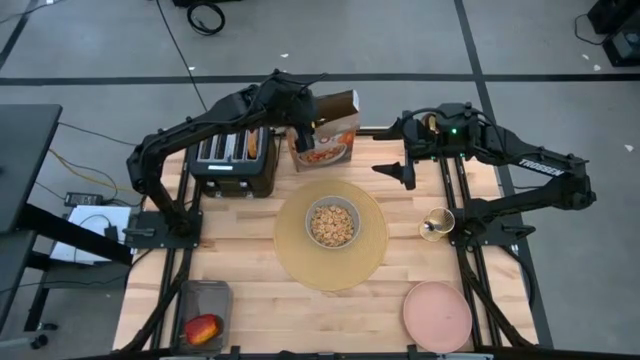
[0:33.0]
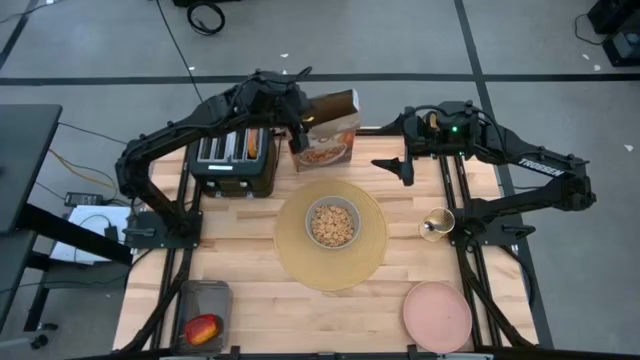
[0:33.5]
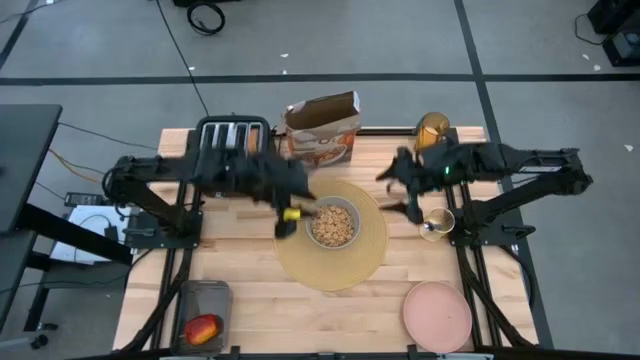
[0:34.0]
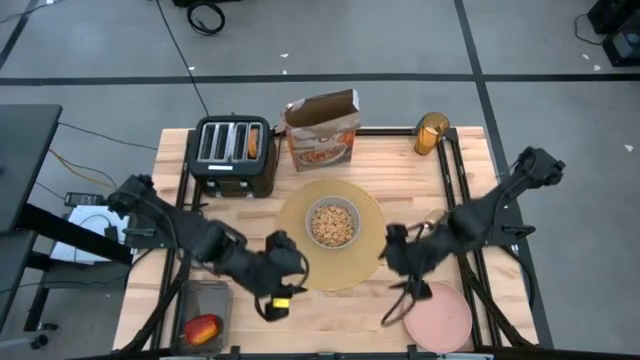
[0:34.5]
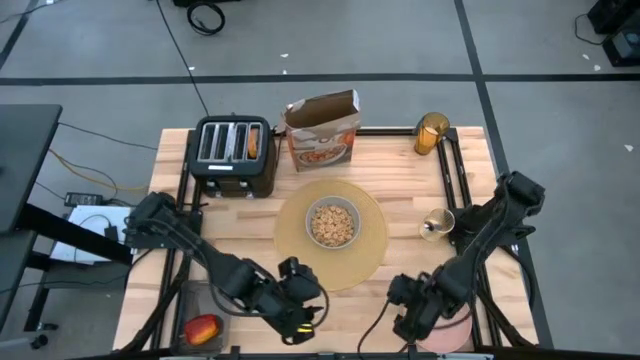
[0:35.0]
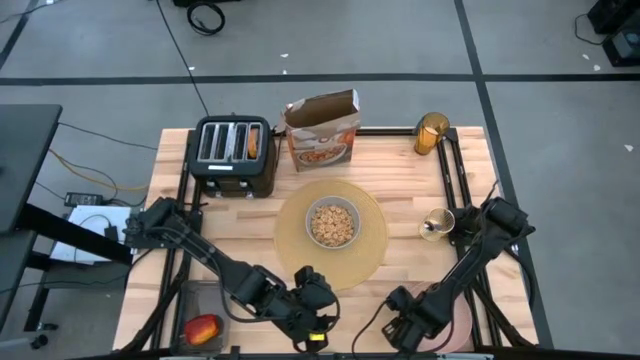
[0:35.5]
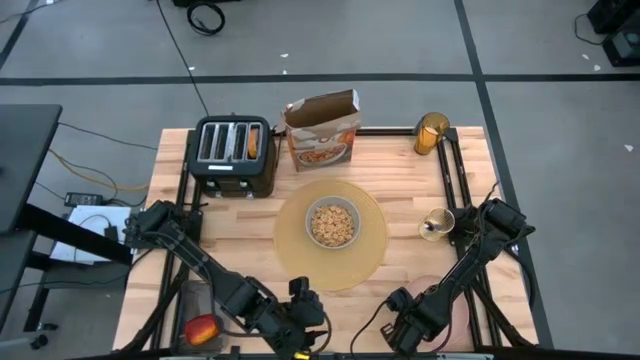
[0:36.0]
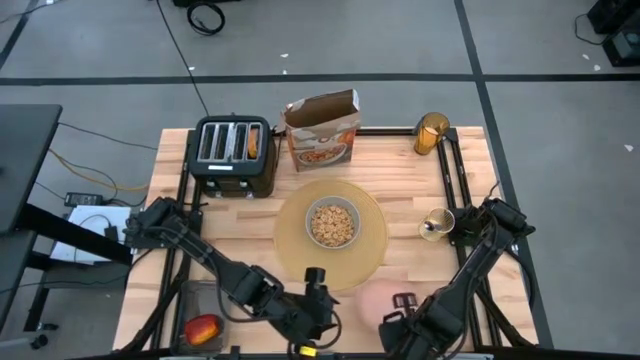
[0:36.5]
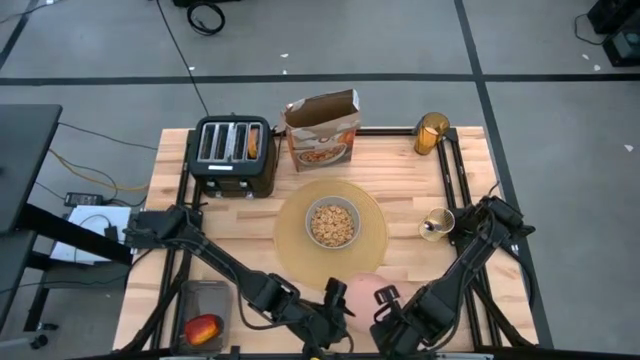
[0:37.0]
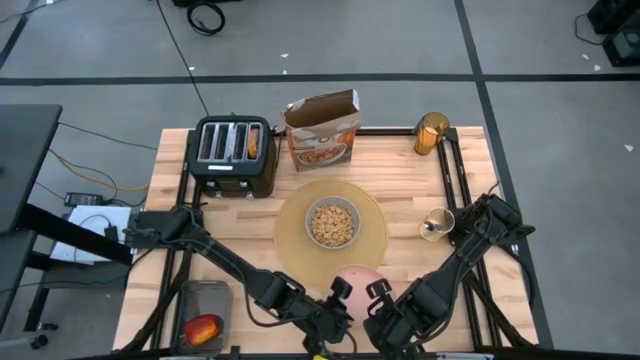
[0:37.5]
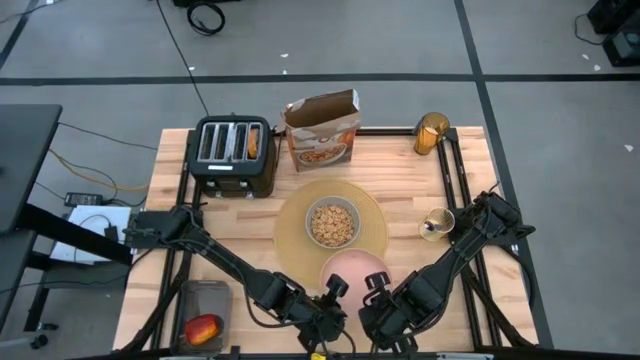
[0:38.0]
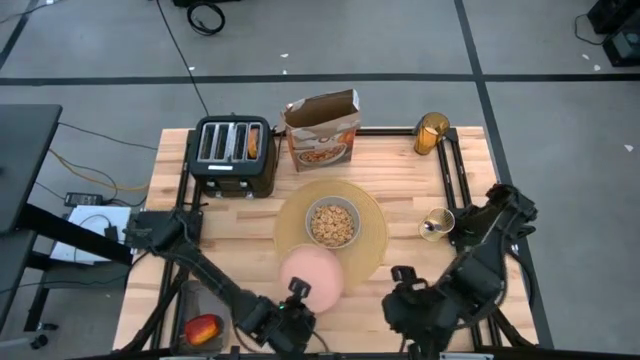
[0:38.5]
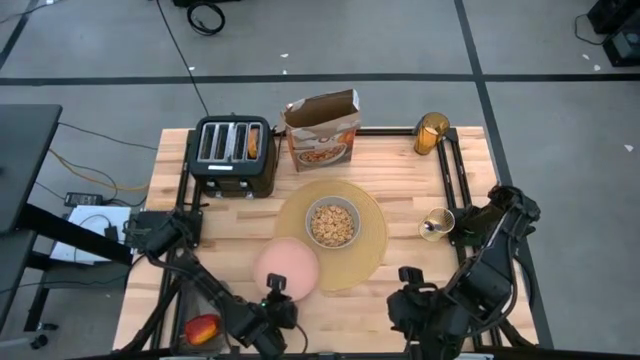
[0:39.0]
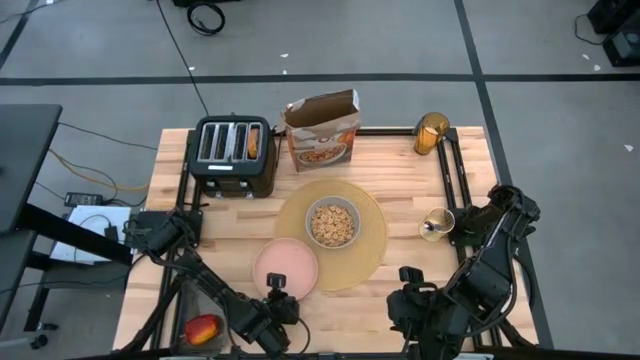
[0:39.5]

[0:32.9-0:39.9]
Task: Arrange a breakfast setting
Put the pink plate on the brown table mat to the bottom left of the gray bowl

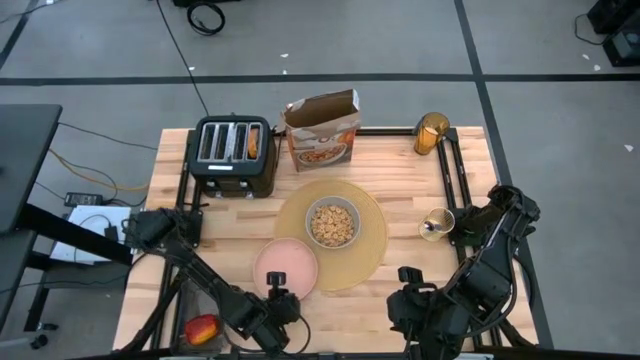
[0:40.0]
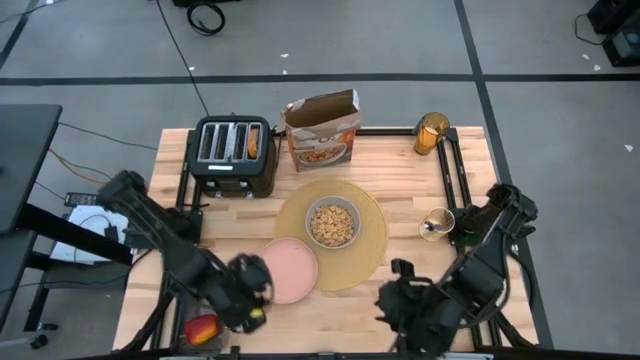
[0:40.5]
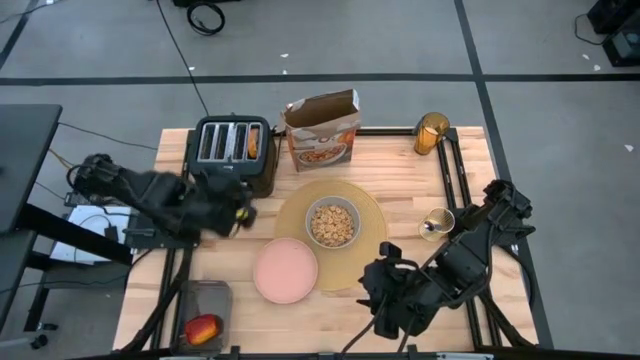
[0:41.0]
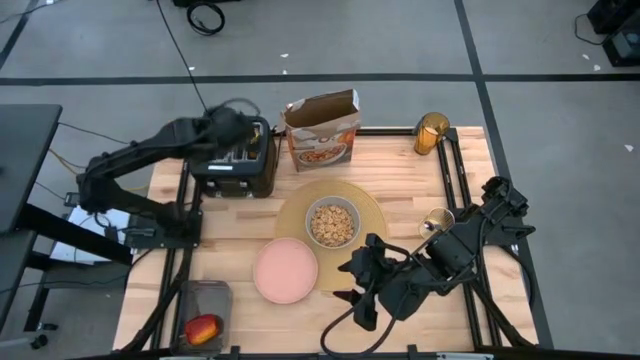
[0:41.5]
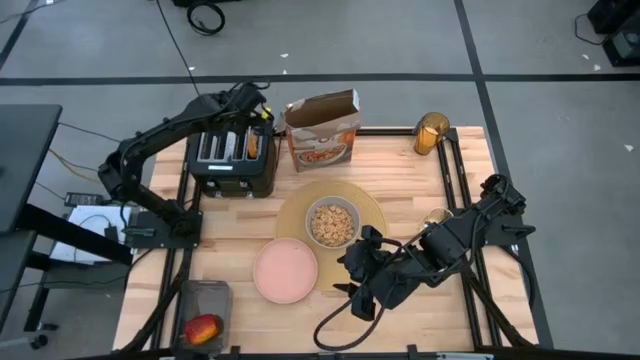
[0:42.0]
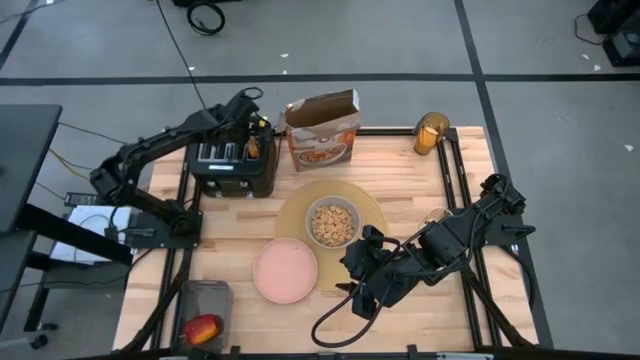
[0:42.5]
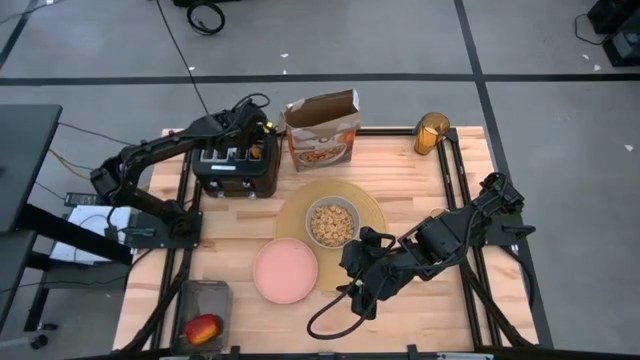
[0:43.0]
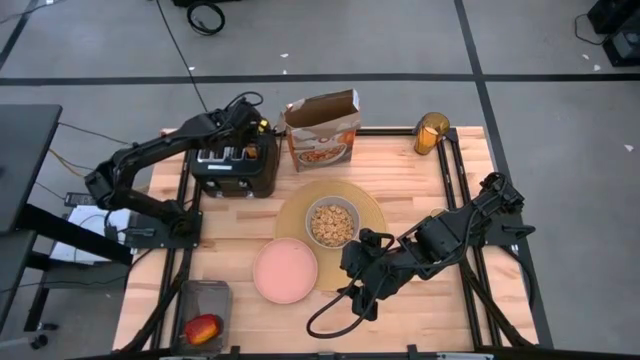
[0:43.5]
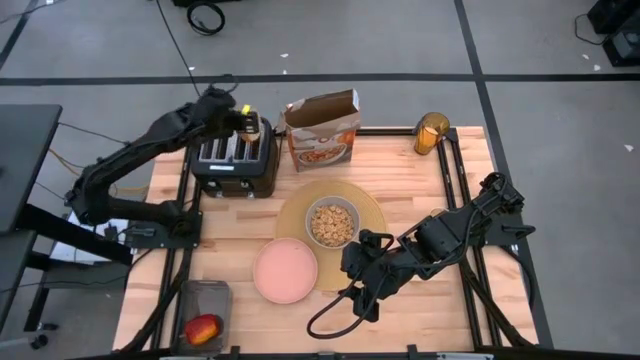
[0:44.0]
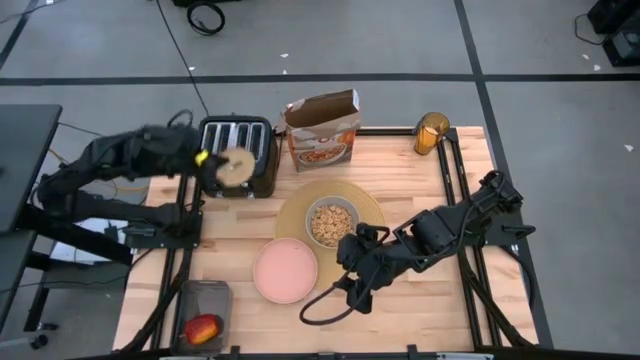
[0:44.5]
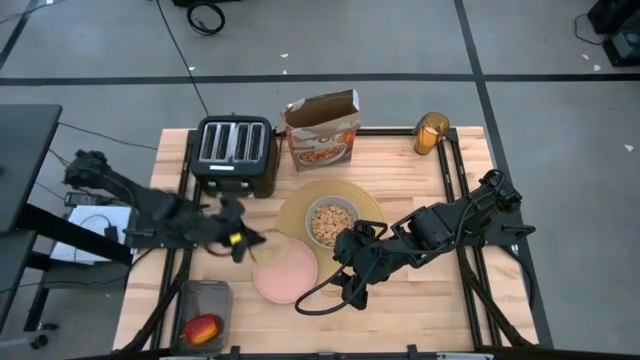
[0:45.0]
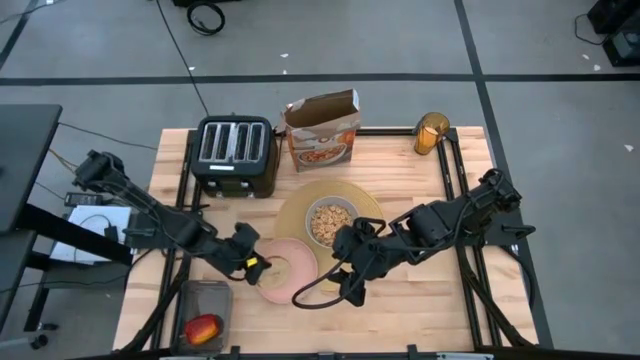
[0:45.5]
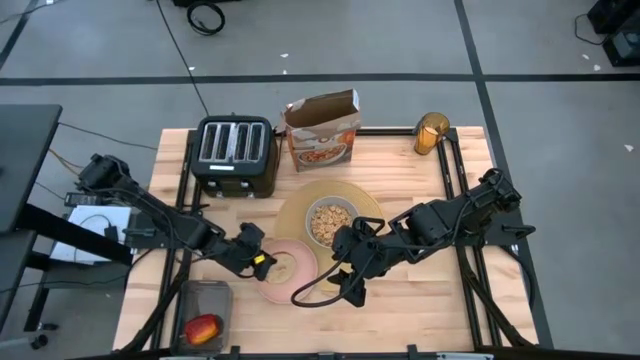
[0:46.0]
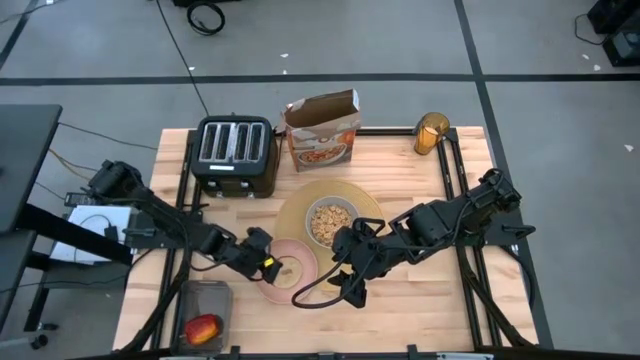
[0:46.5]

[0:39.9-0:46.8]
Put the toasted bread from the toaster on the pink plate

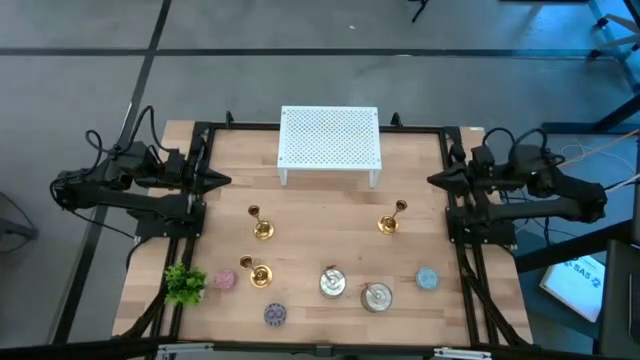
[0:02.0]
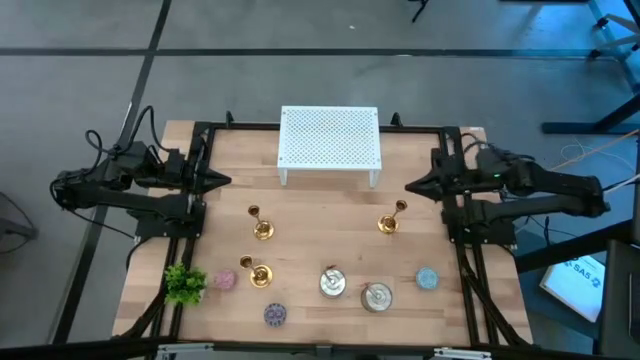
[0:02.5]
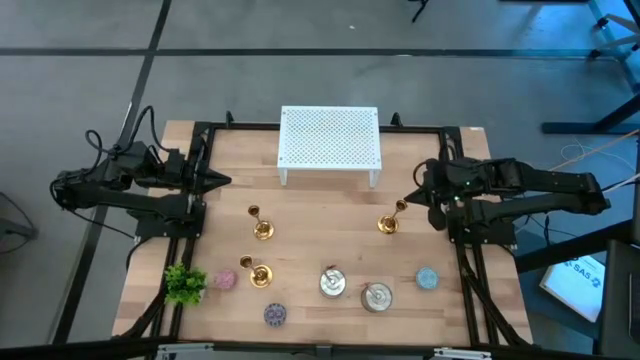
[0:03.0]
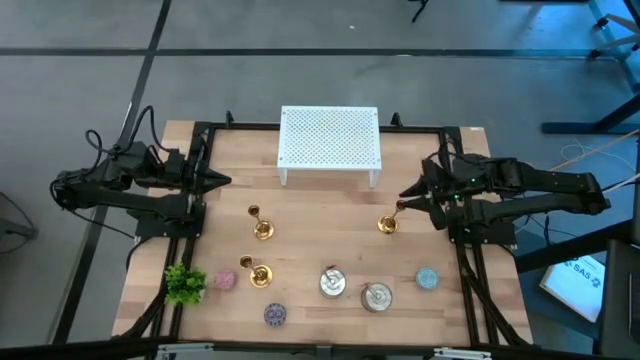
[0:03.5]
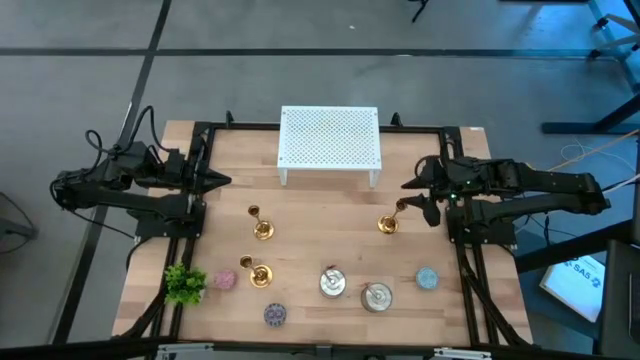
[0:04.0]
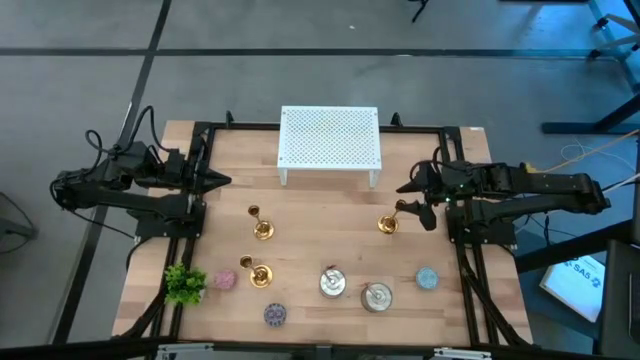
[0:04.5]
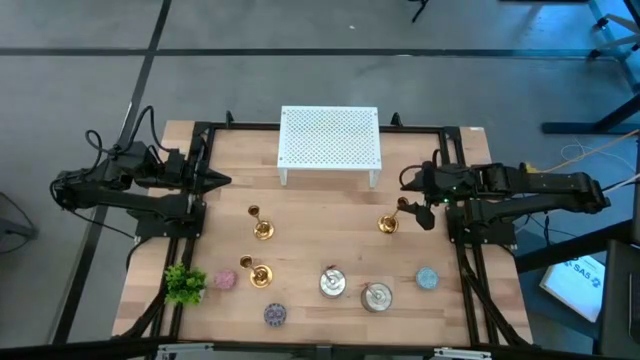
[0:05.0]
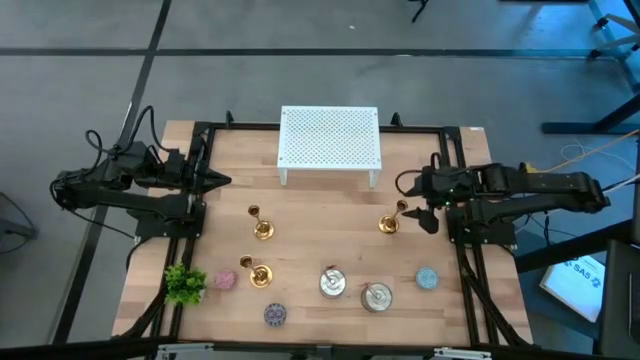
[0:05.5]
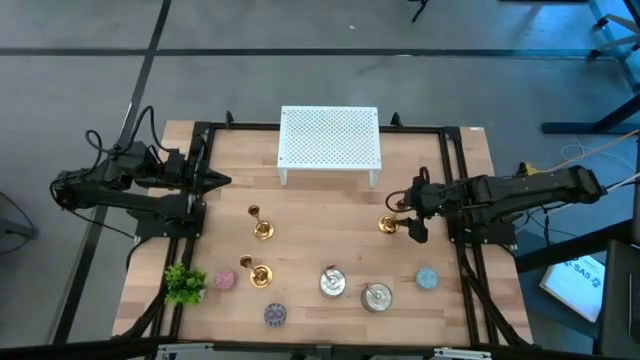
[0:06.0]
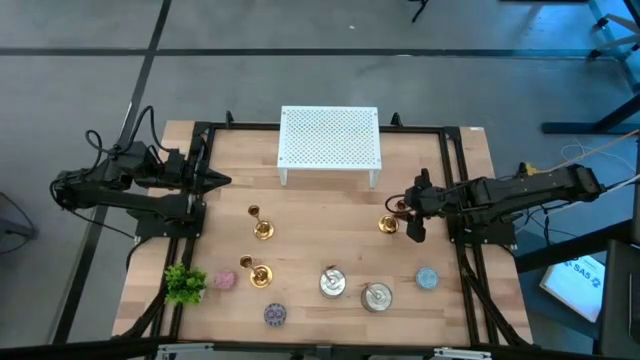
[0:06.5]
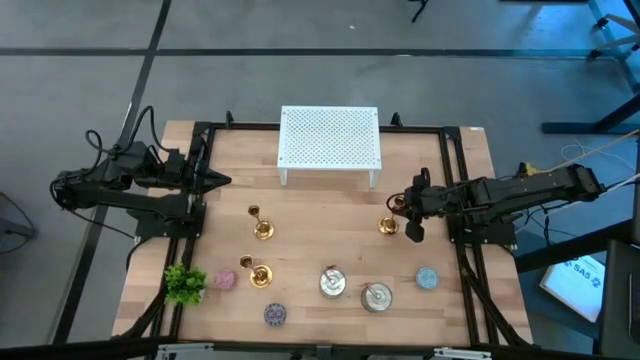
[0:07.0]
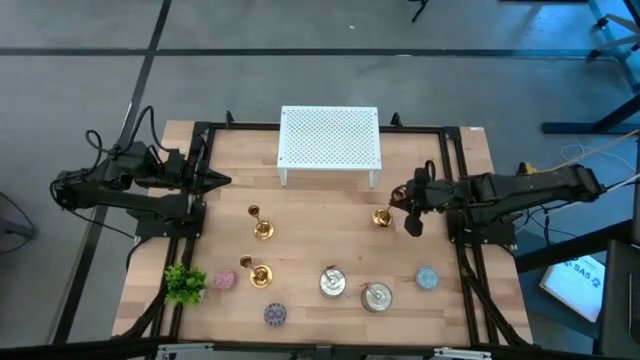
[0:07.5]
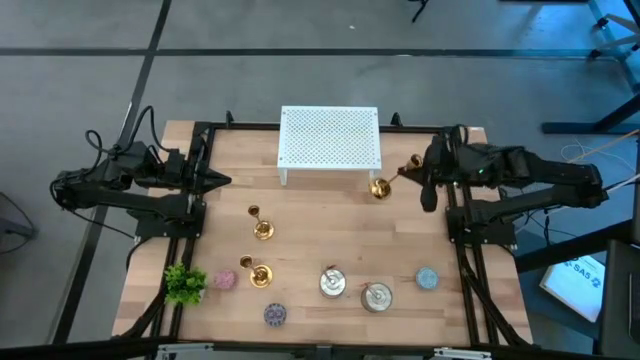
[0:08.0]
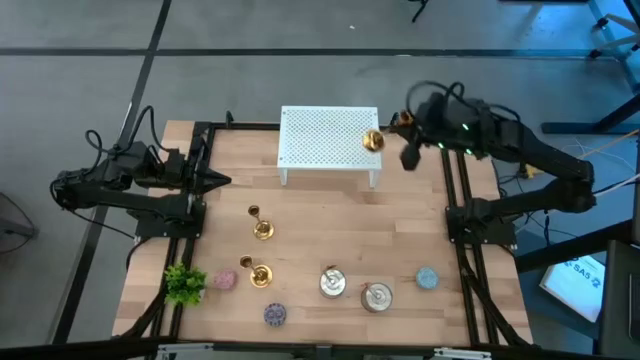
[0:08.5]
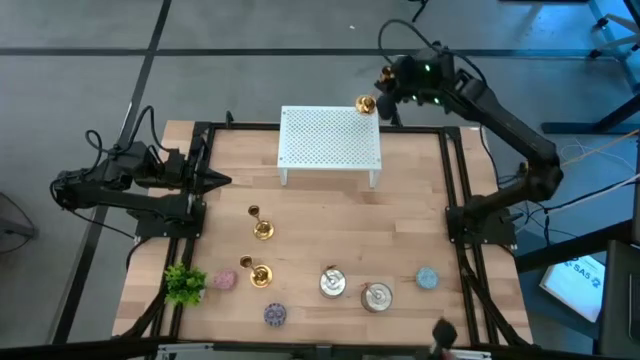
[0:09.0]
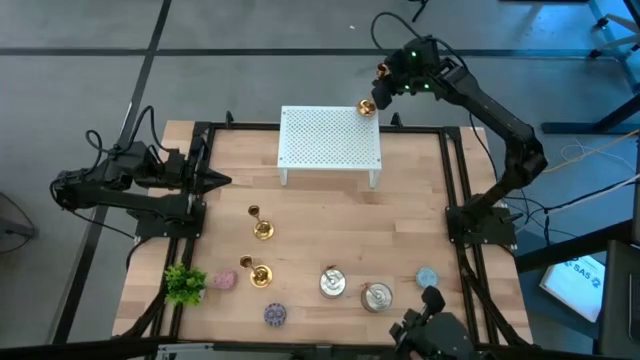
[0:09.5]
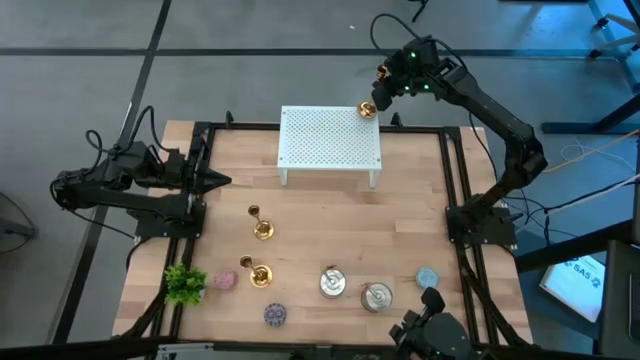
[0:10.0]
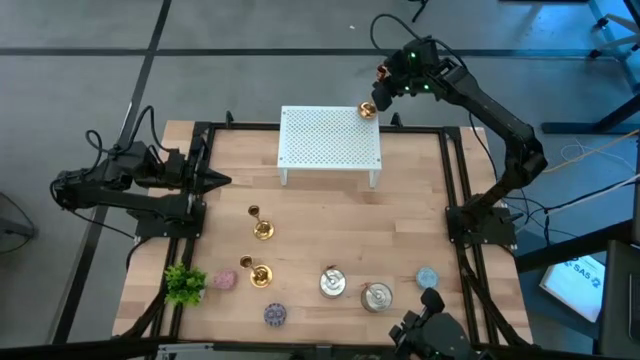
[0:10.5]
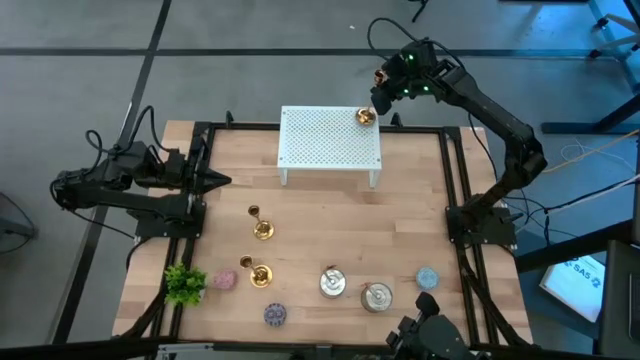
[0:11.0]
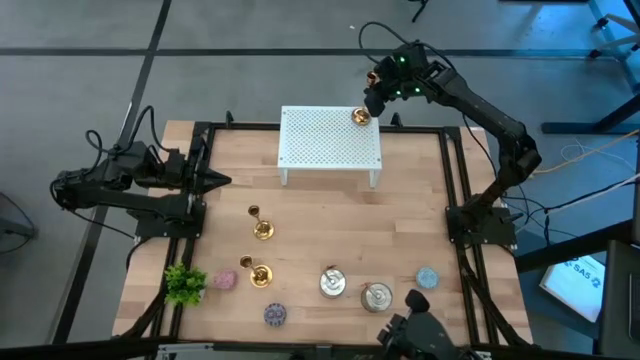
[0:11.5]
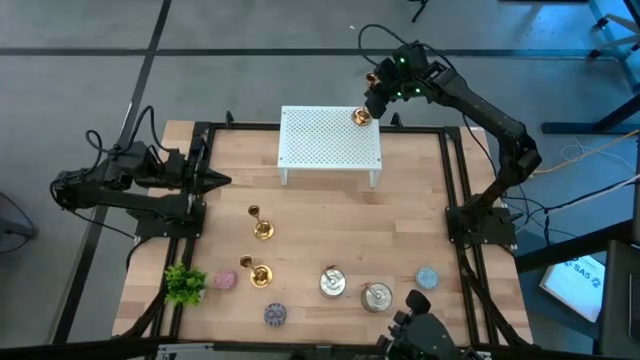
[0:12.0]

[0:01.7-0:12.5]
Task: Pick & Place candle stick holders
Put the top right gold candle holder on the shelf
